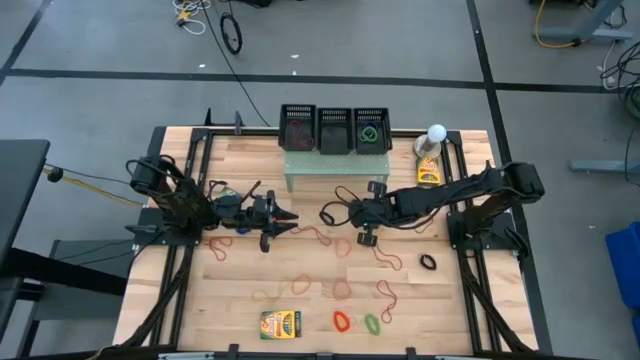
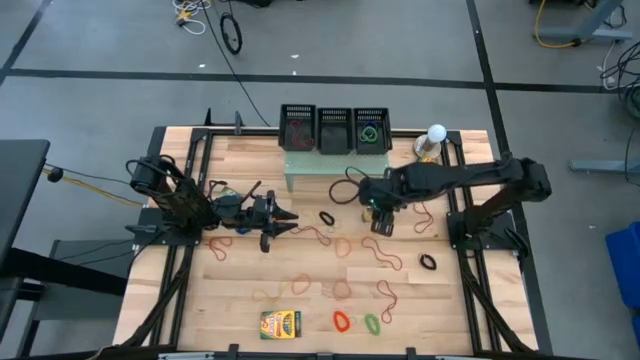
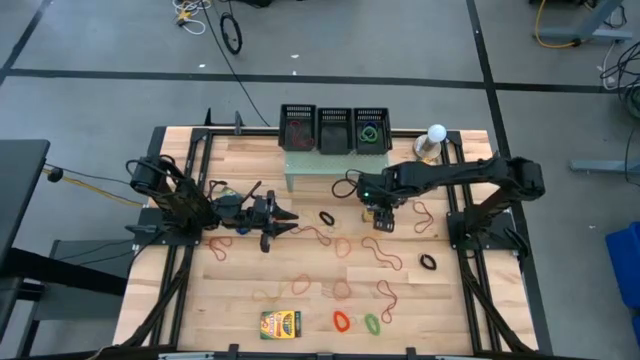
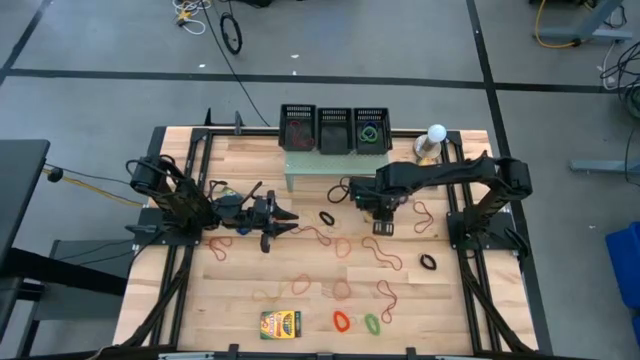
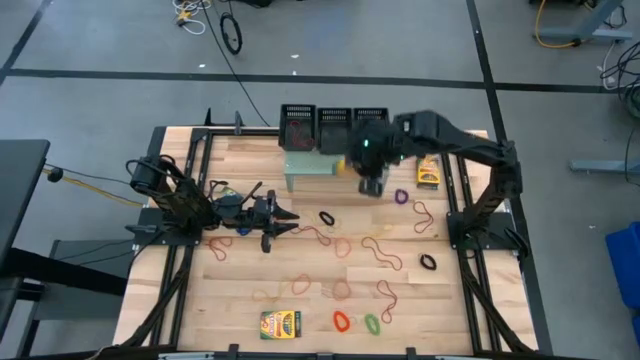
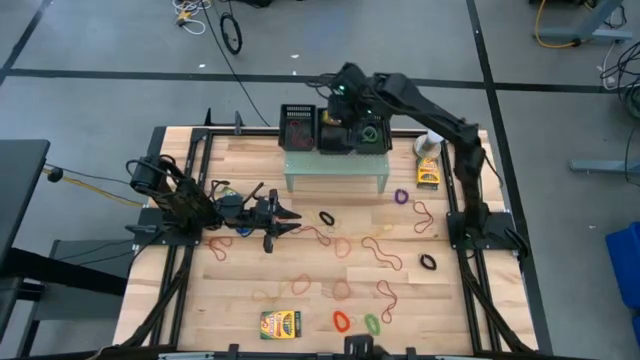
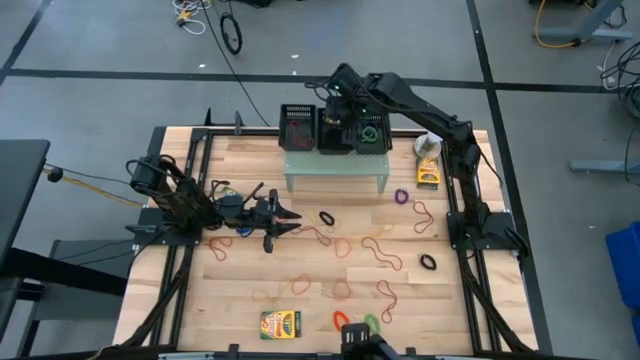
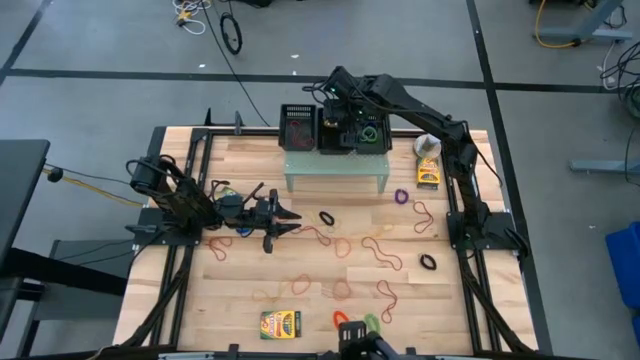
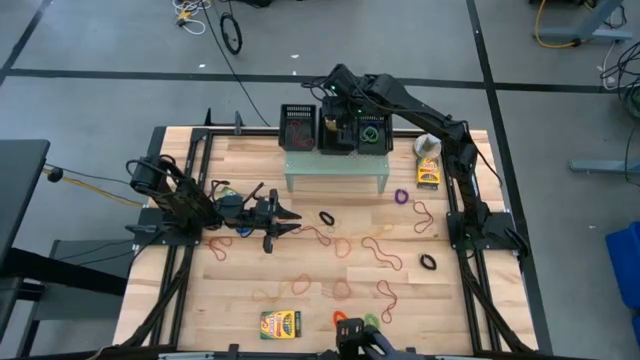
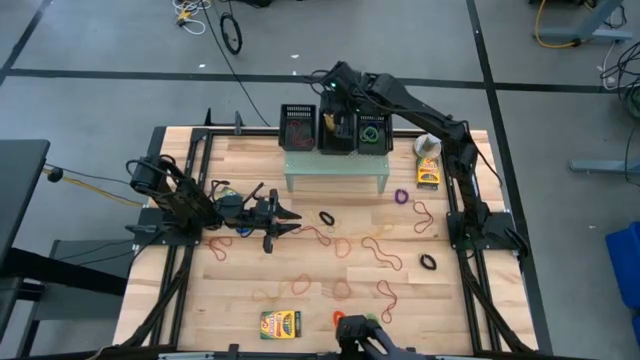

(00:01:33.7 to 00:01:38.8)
Task: Pick & Place Office Desk Supplies
Put the crayon box on the middle black bin on the shelf

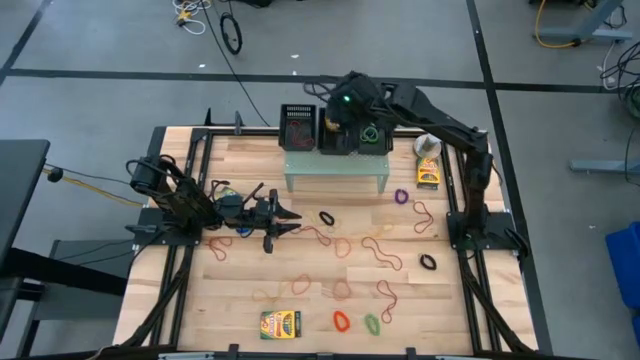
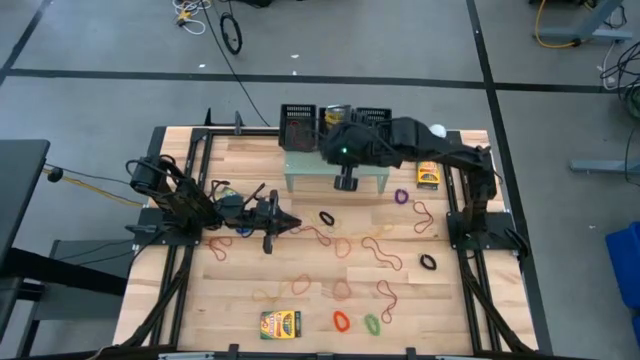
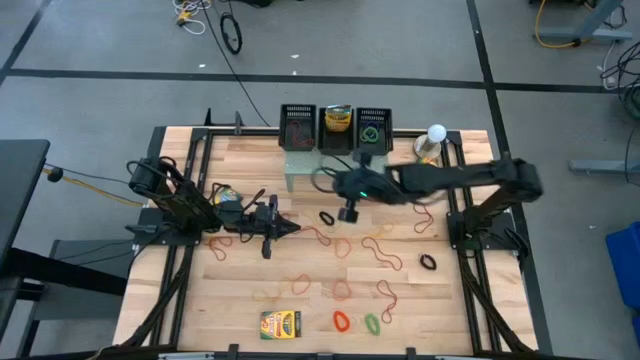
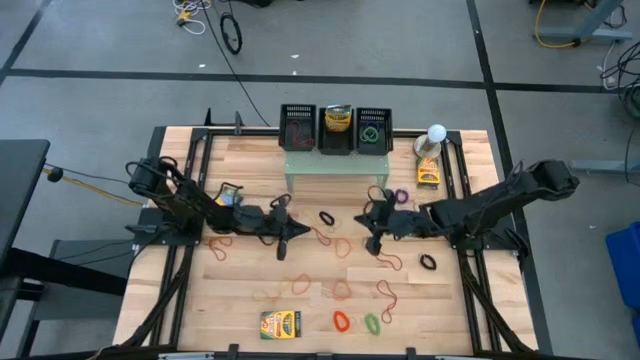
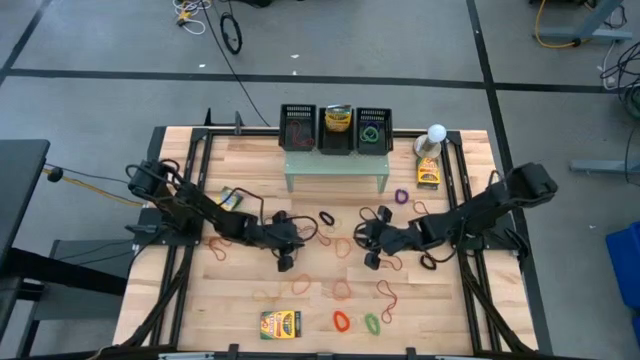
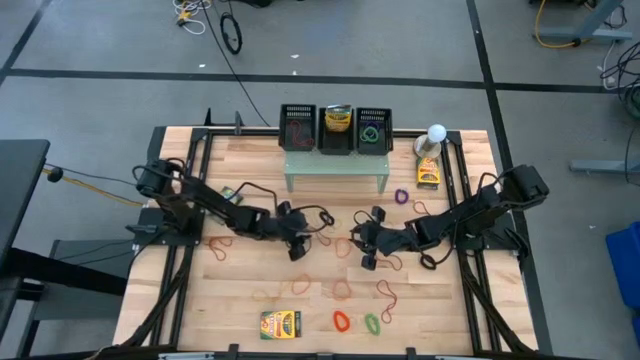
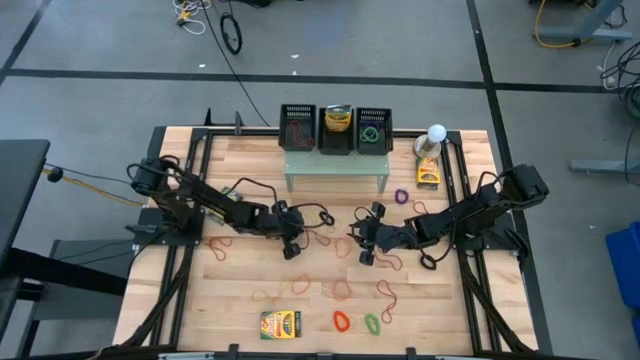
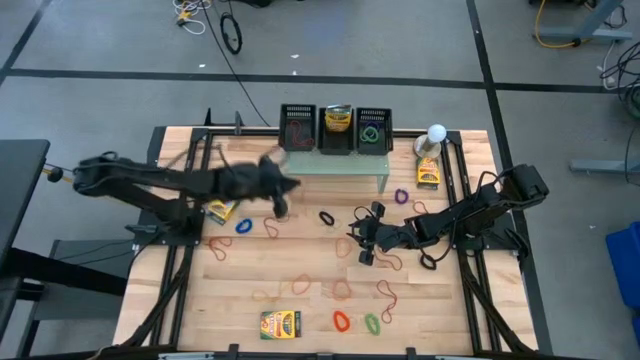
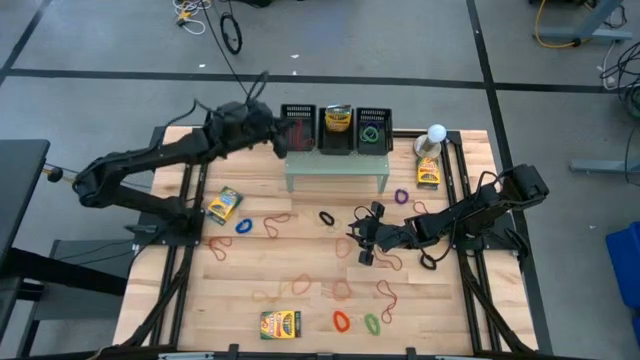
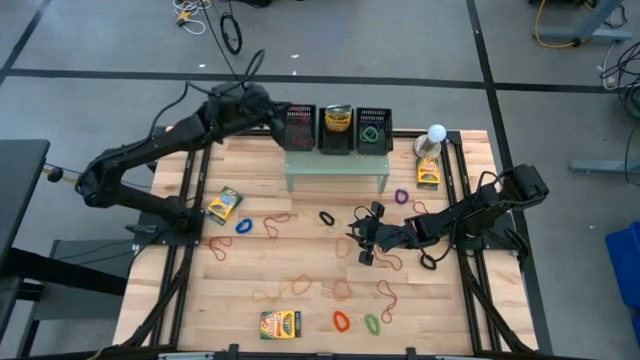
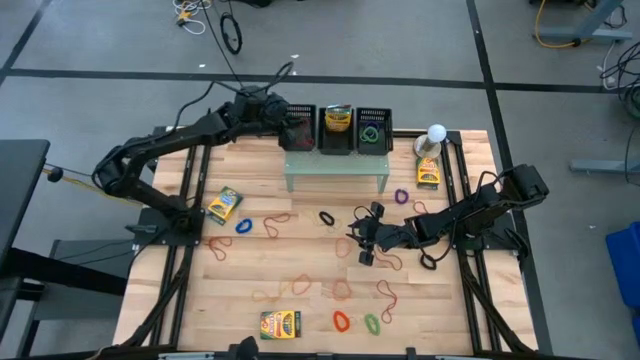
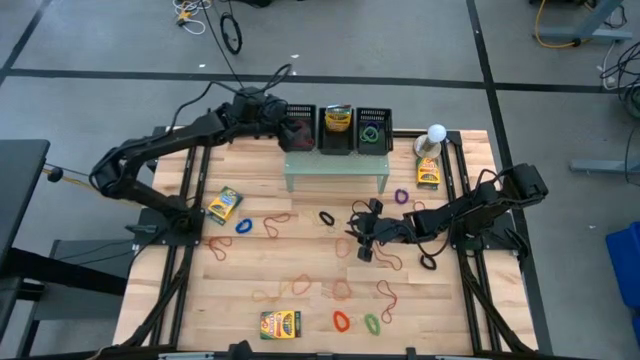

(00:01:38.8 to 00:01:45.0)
Put the red rubberband on the left black bin on the shelf

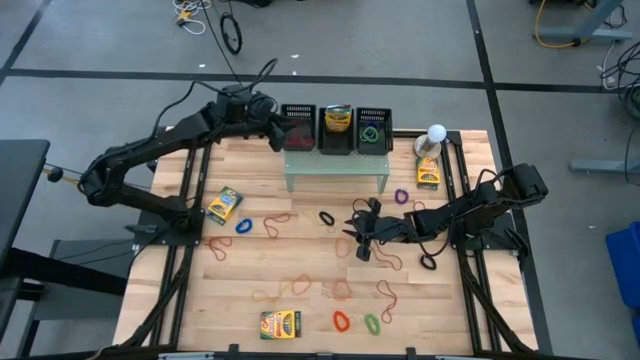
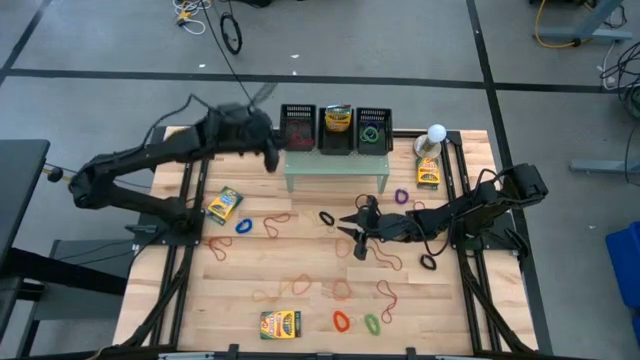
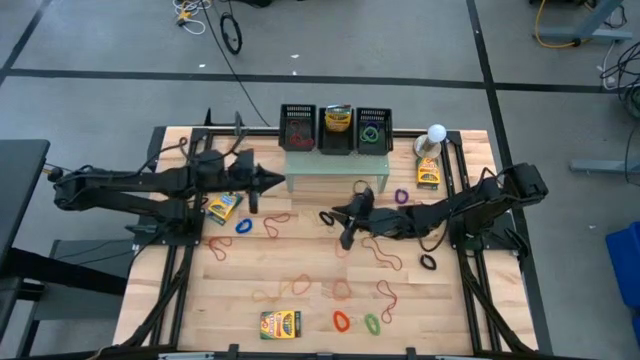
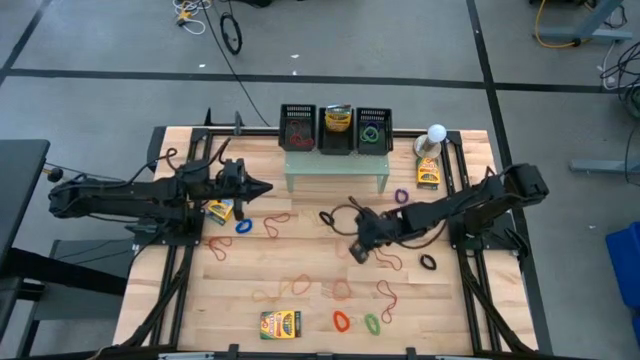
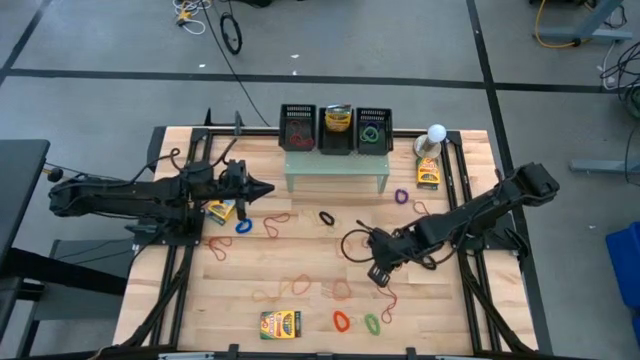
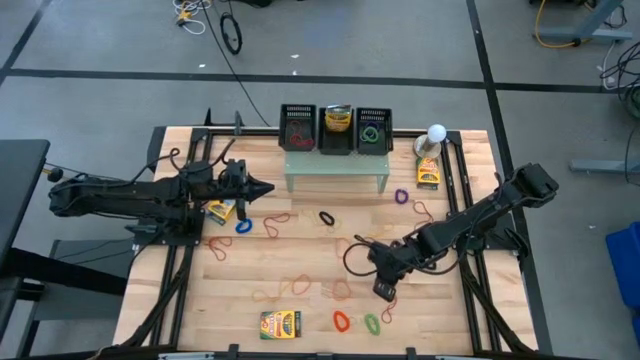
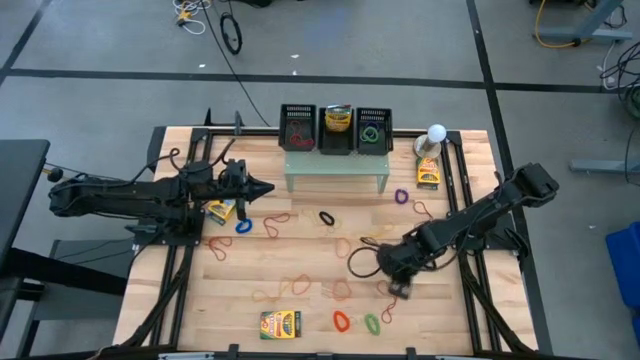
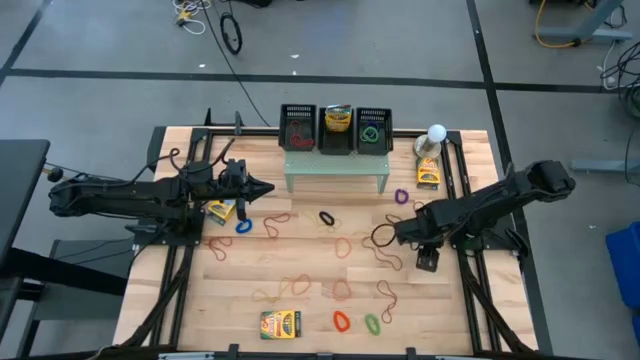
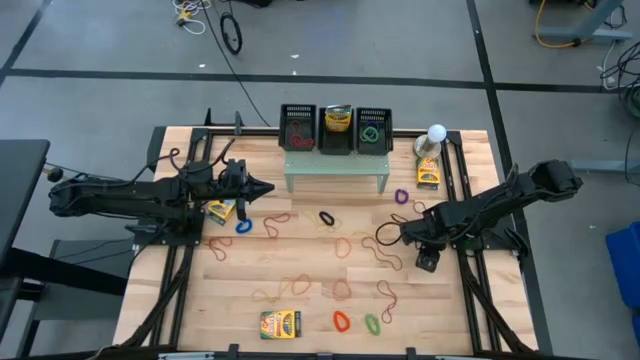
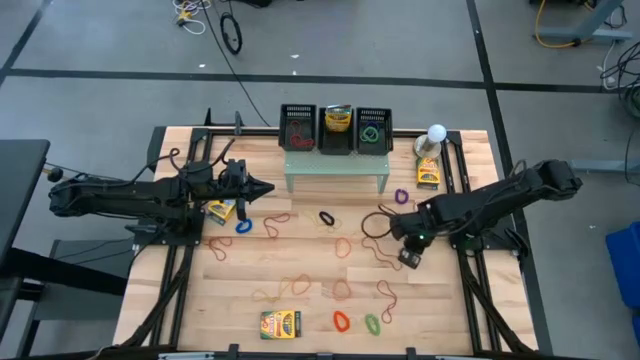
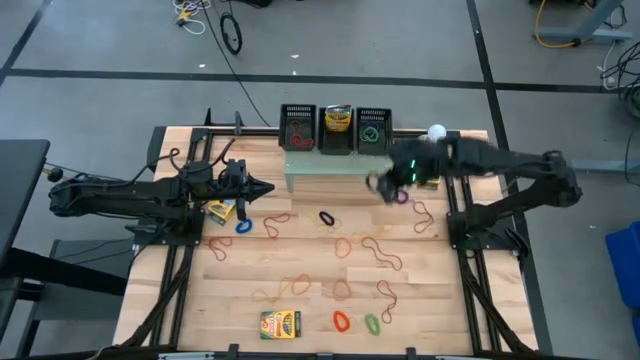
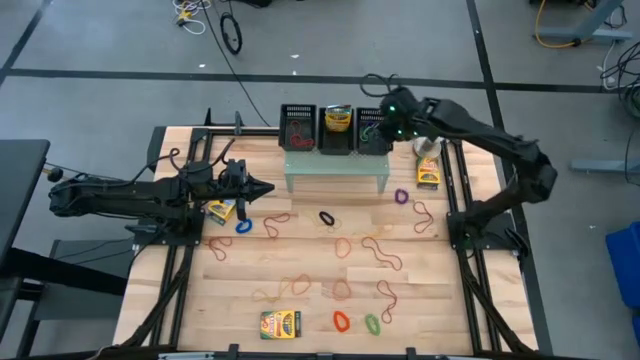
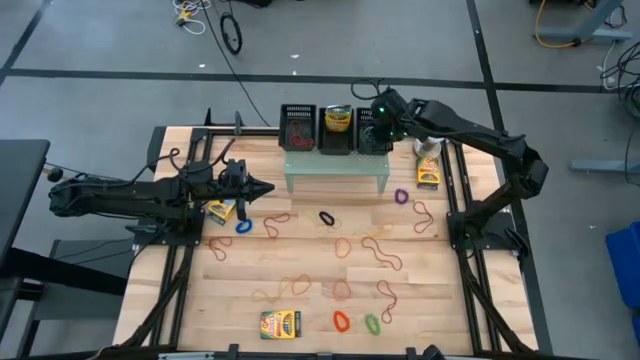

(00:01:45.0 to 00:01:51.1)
Put the black spring bracelet into the right black bin on the shelf

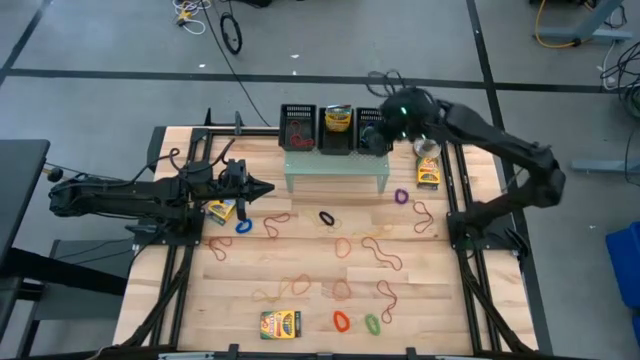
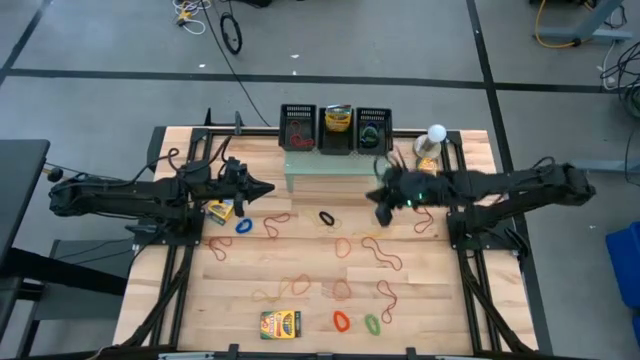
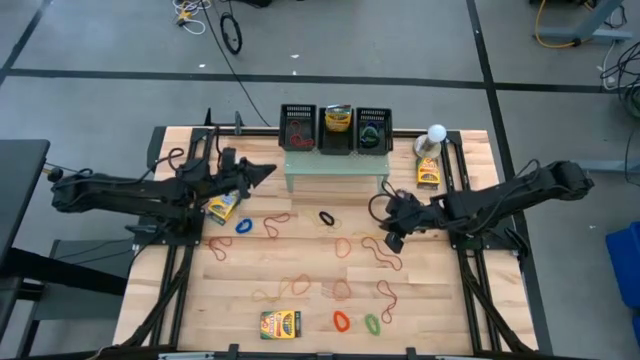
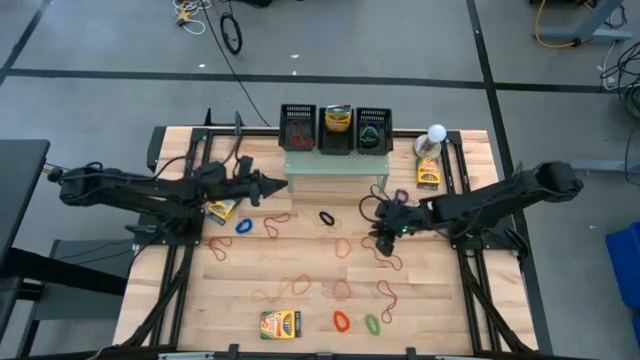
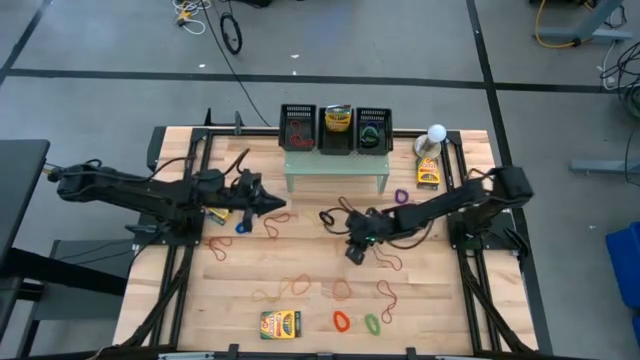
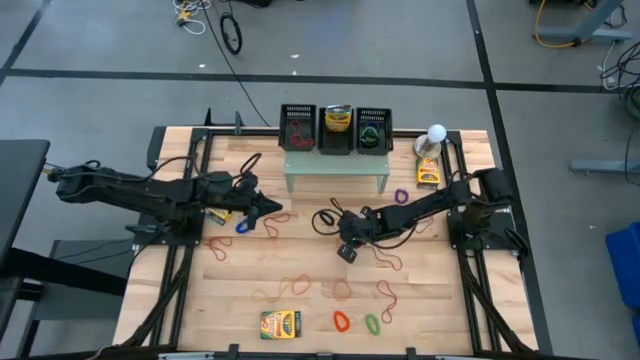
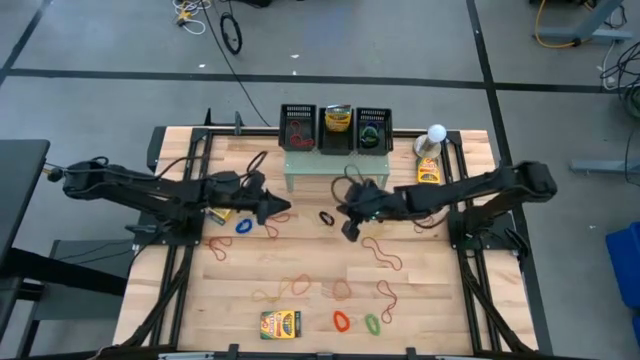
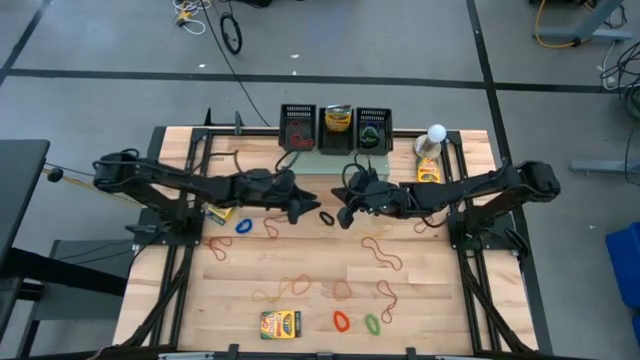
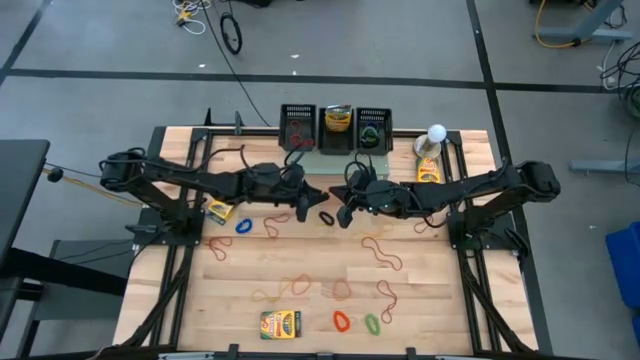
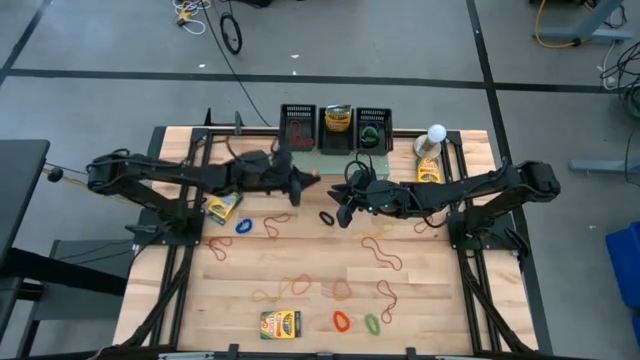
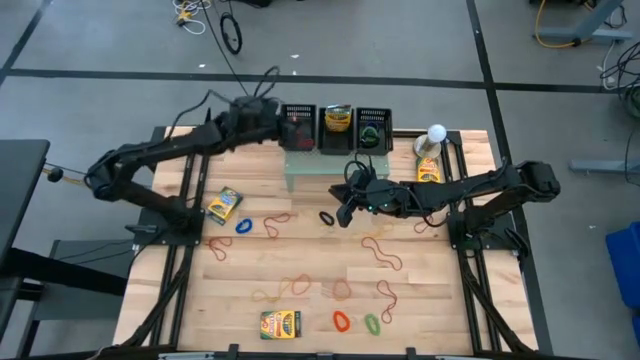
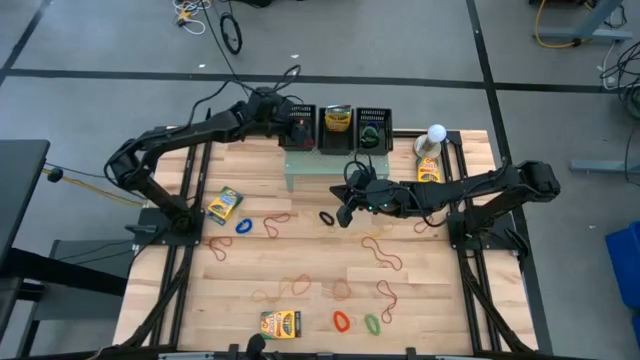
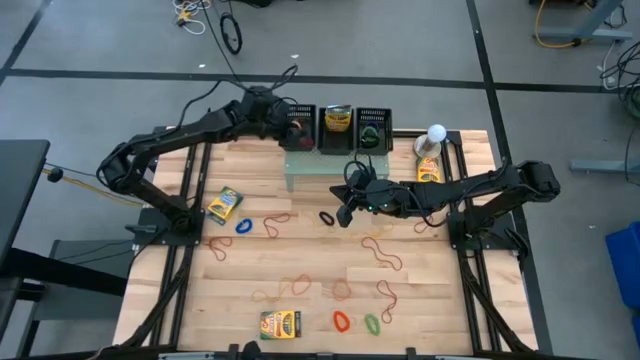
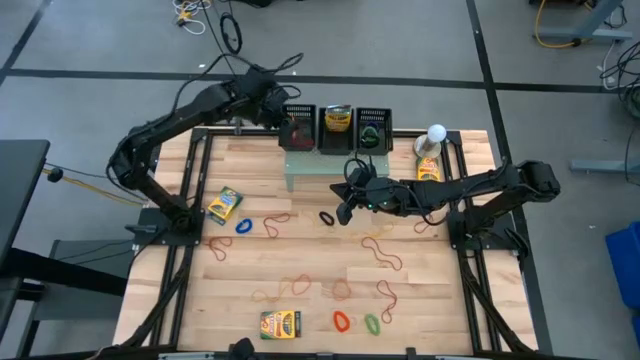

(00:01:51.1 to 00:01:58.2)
Put the orange rubberband into the left black bin on the shelf
